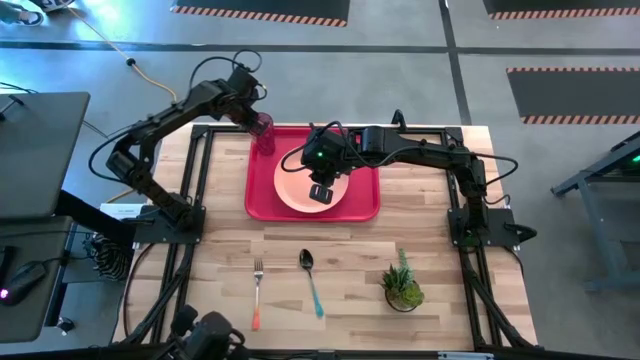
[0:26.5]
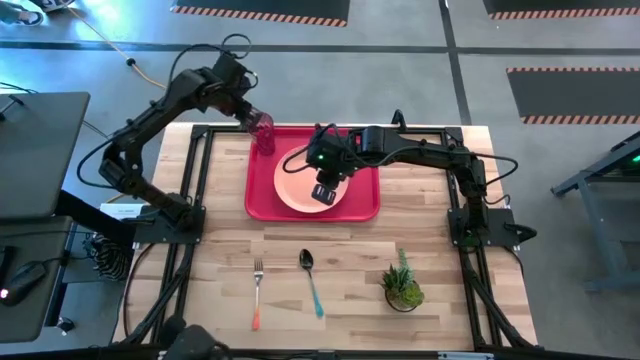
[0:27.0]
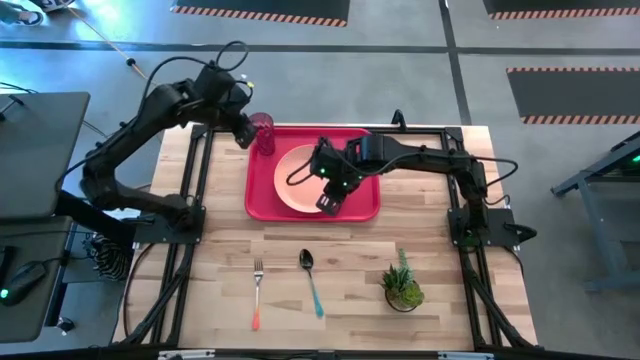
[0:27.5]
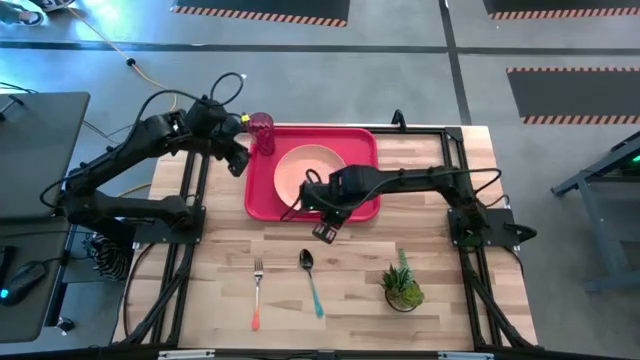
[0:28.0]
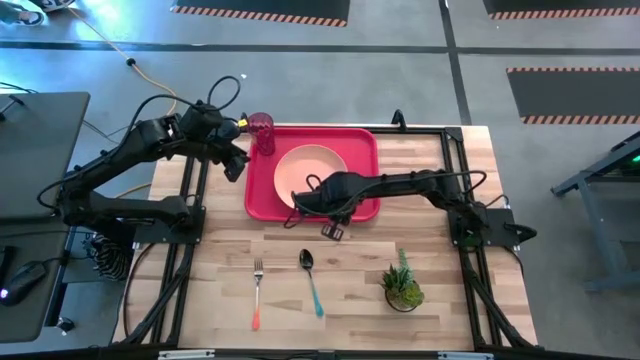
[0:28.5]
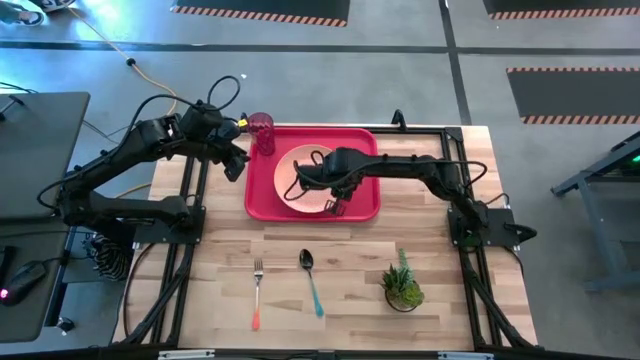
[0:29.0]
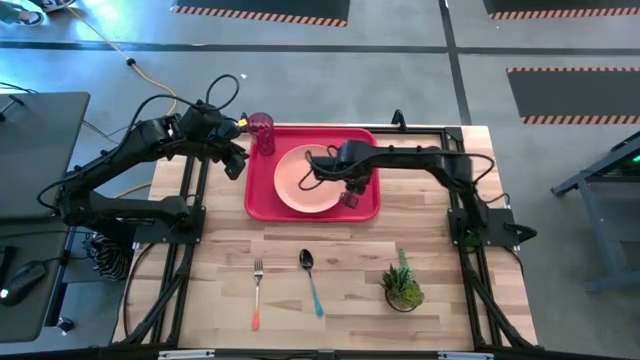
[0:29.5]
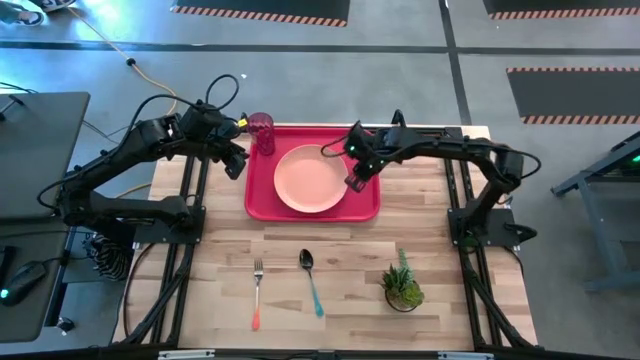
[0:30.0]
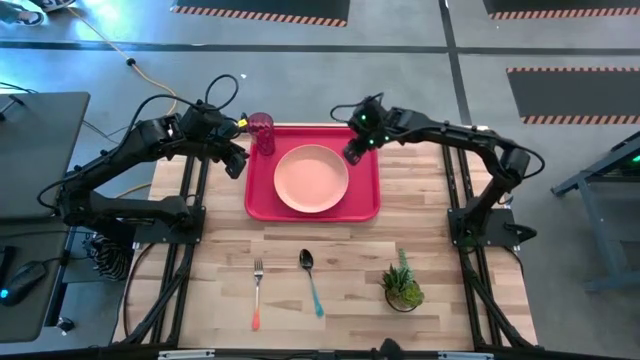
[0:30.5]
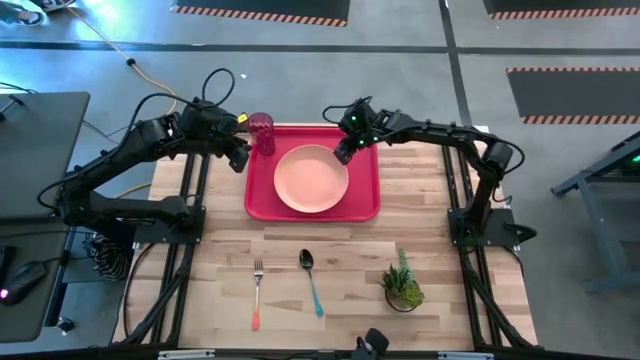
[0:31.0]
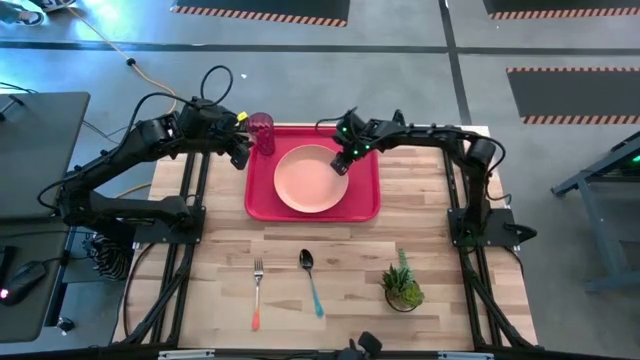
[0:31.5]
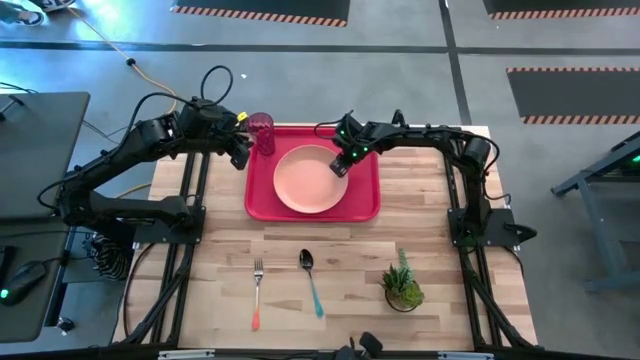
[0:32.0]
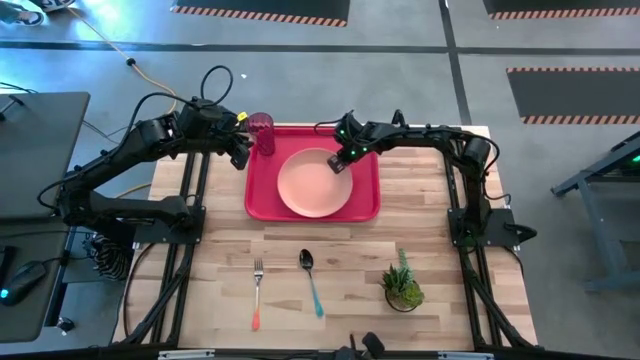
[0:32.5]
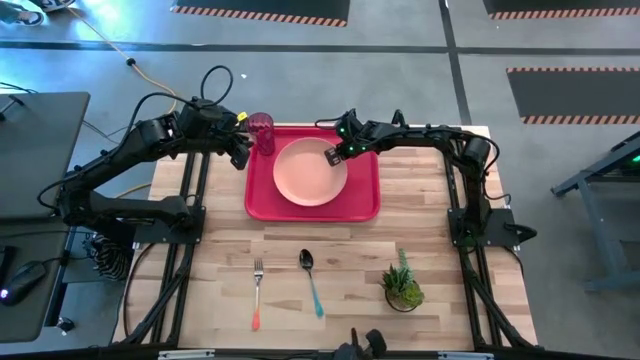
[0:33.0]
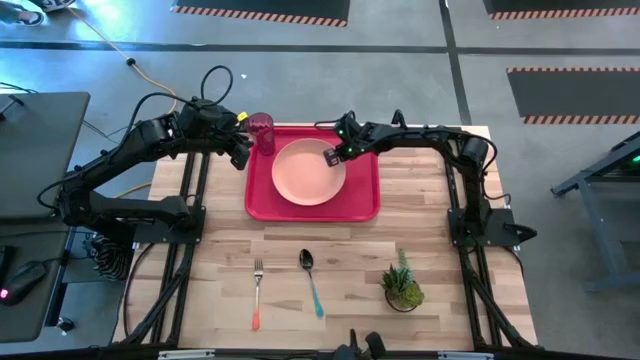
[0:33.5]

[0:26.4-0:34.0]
Task: Pick and place plate/cup/fork/spoon on tray
Adjust the pink plate on the red tray

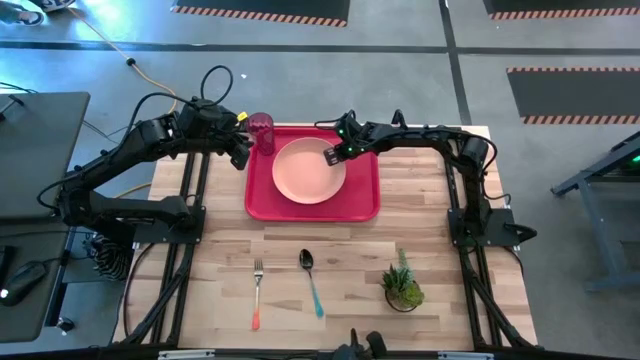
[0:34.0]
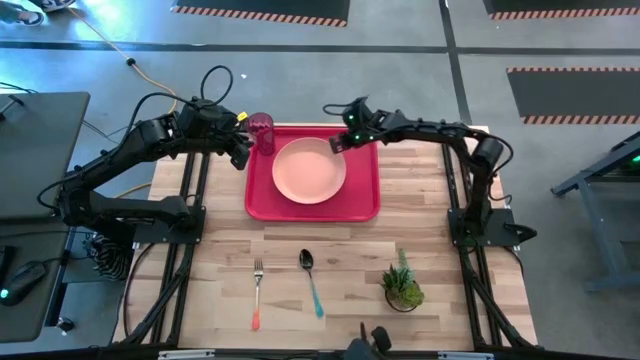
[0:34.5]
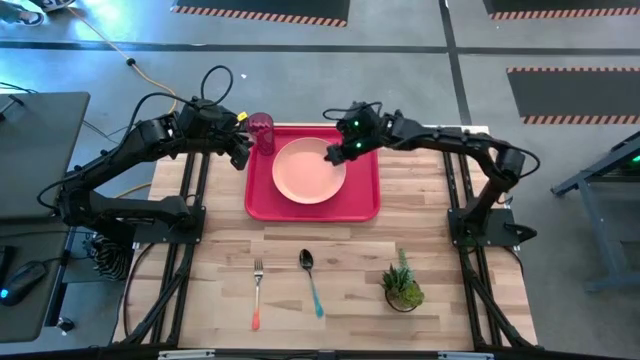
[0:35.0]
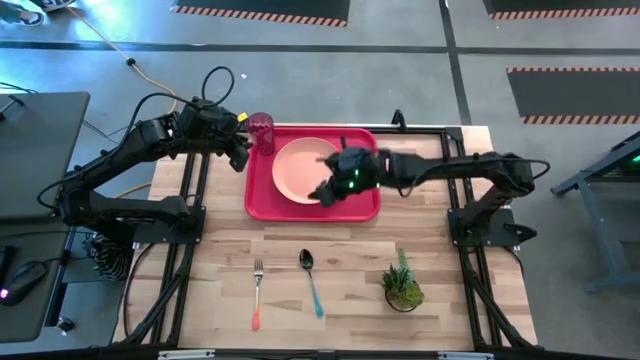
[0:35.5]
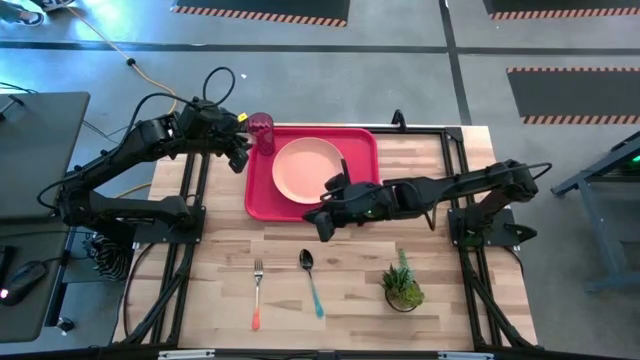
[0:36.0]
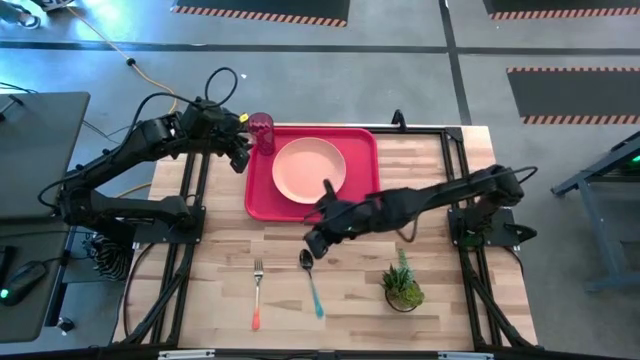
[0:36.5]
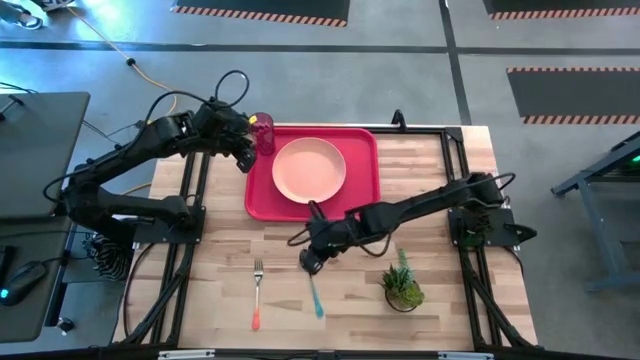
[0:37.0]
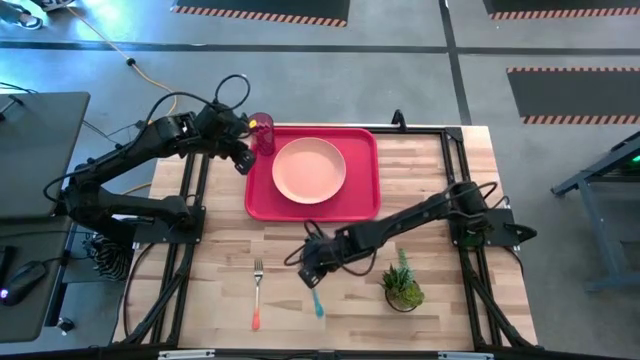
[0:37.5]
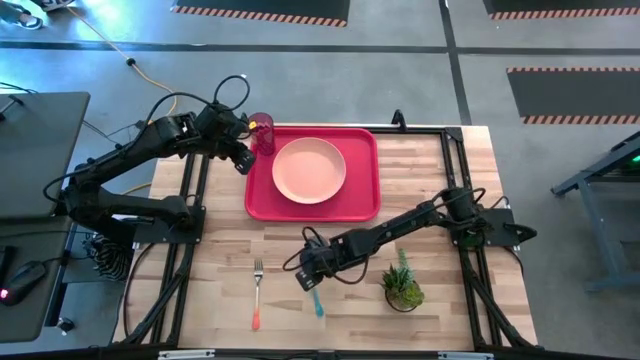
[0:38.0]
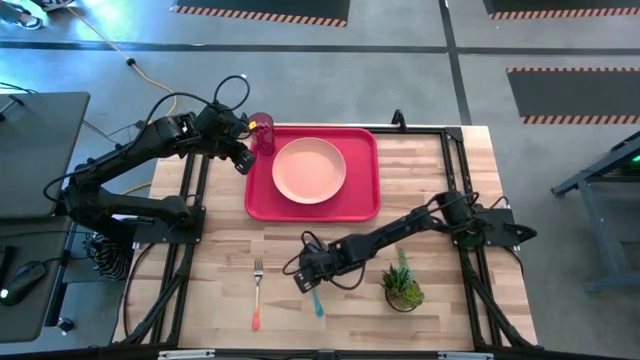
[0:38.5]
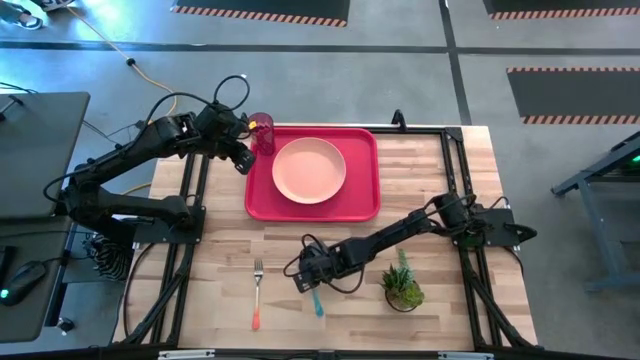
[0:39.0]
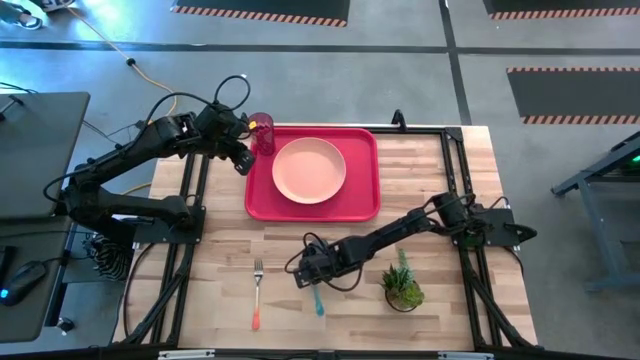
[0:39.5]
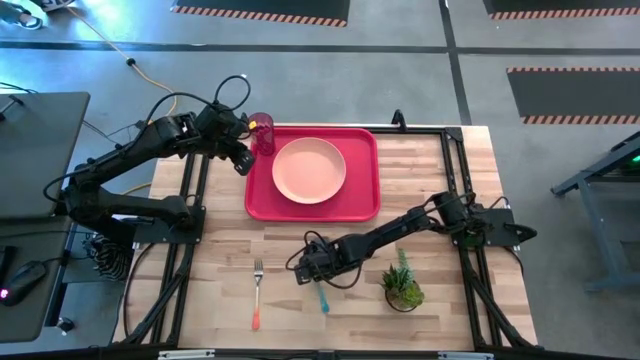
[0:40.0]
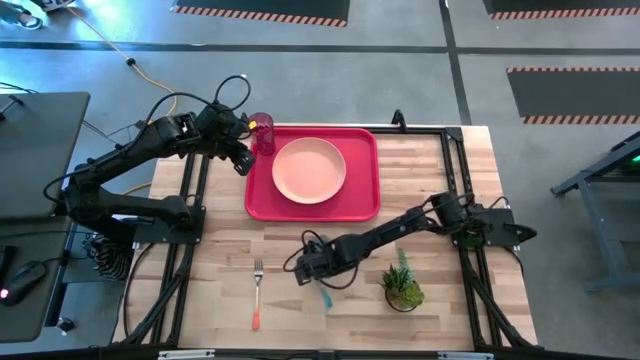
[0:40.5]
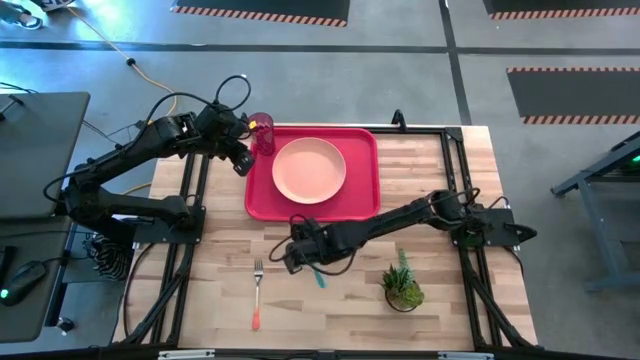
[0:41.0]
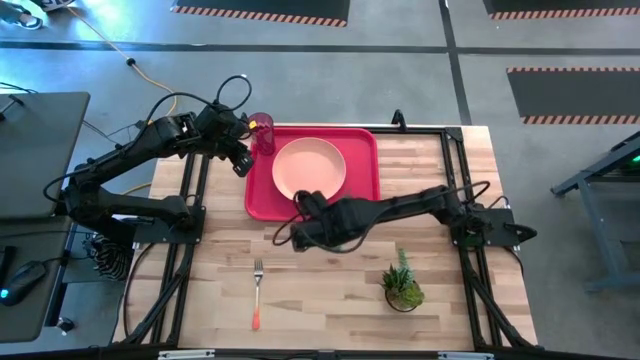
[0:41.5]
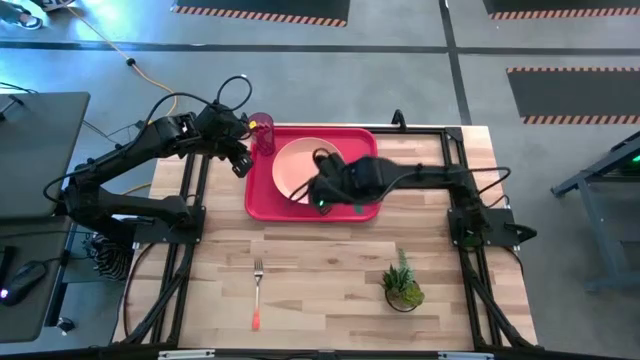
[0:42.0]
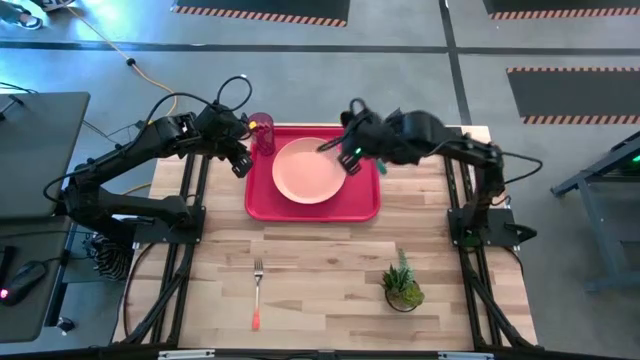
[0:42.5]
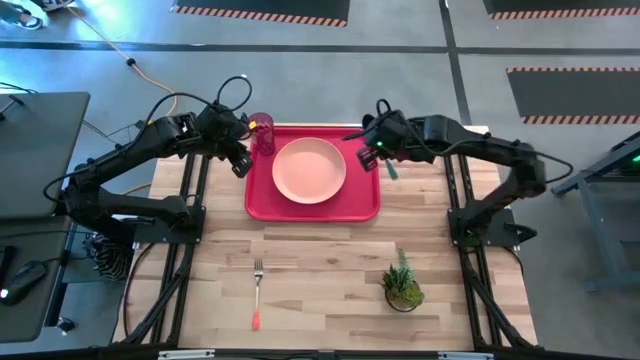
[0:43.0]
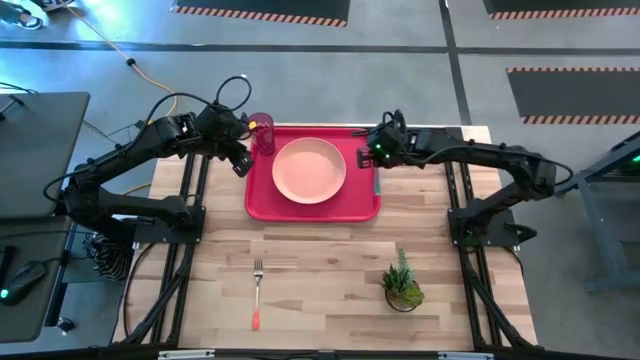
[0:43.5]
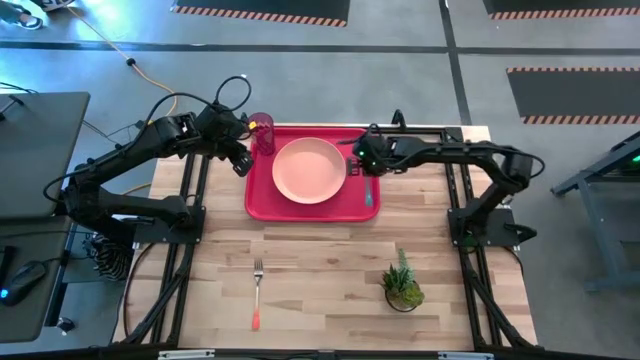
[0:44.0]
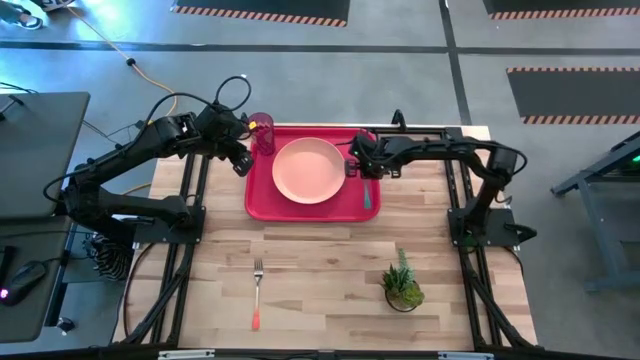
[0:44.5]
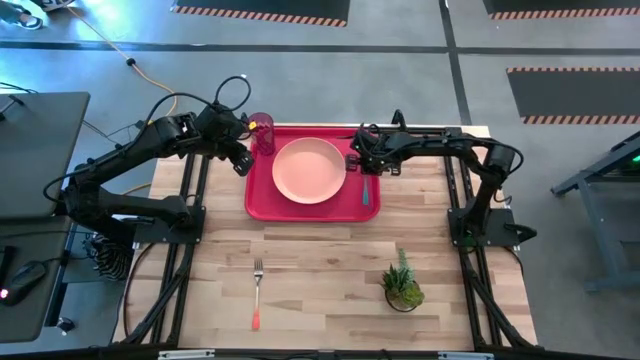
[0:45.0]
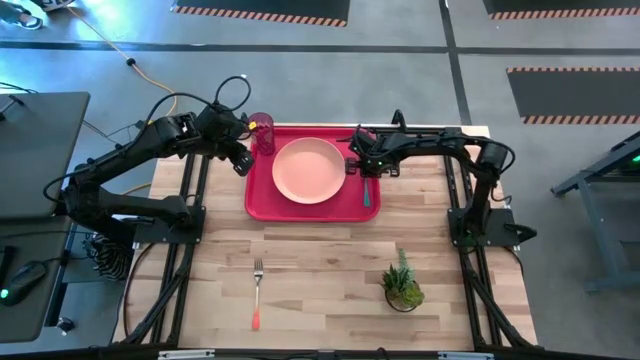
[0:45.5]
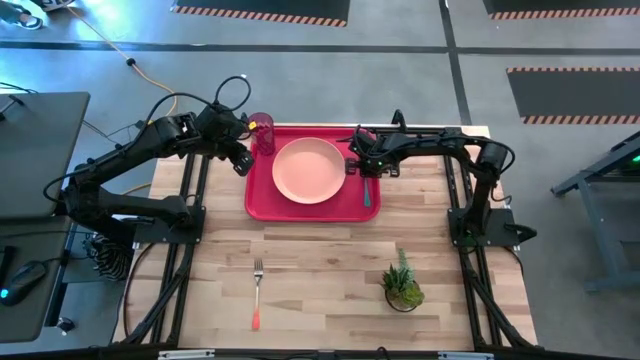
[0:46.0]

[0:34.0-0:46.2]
Put the blue spoon on the red tray to the right of the pink plate

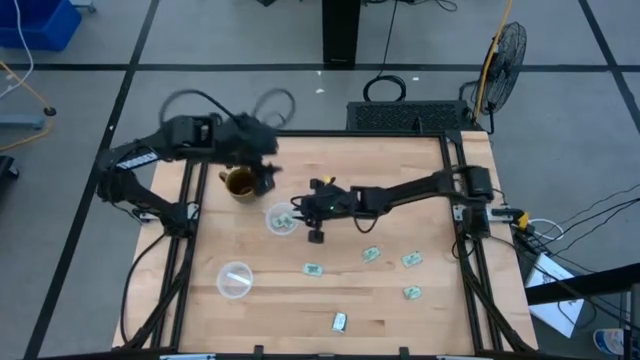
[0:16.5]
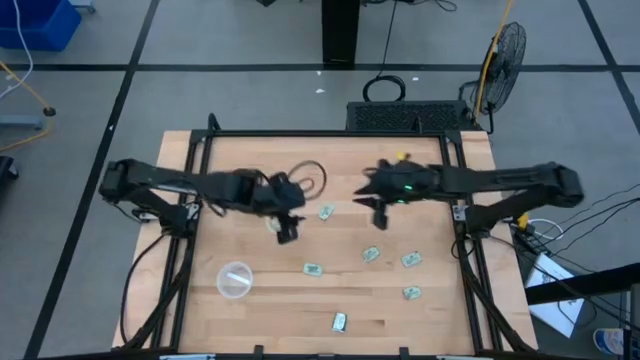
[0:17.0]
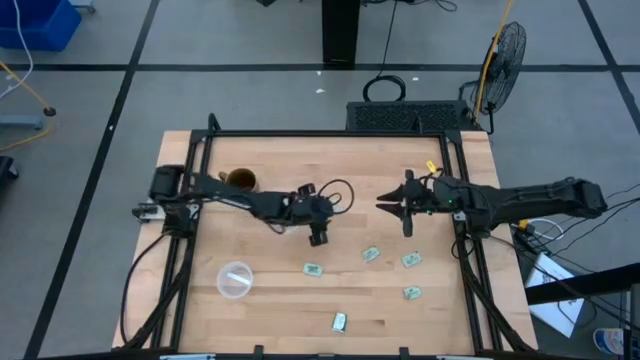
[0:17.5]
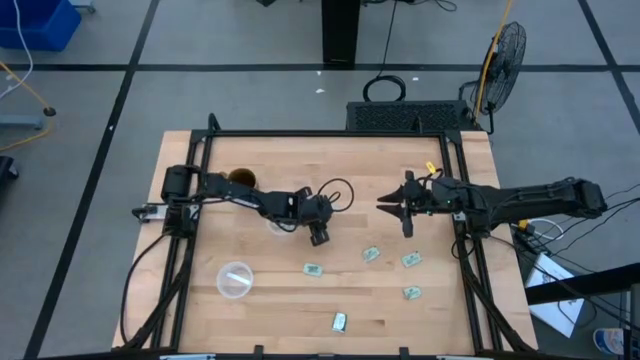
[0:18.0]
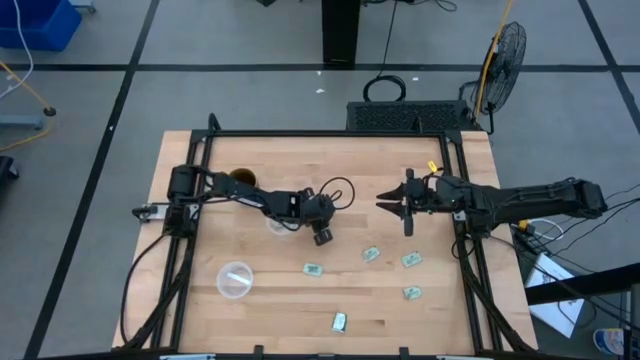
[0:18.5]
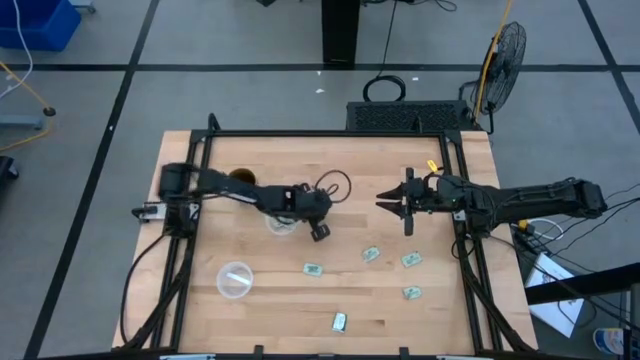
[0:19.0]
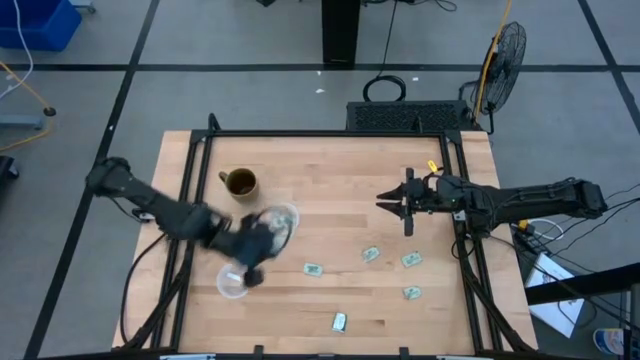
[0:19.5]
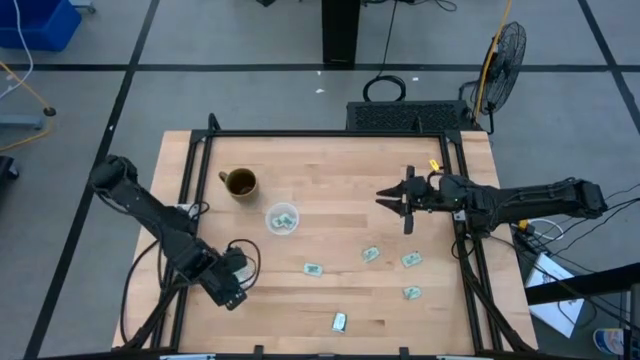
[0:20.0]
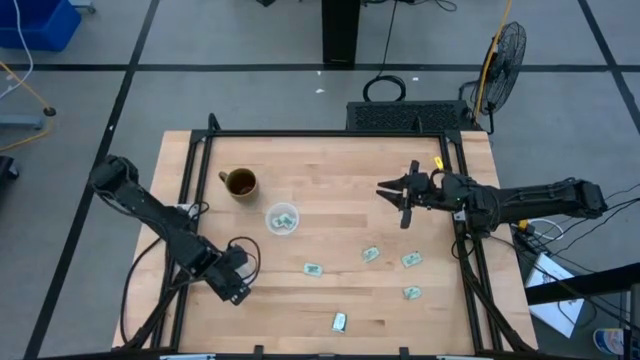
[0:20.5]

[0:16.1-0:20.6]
Task: Pick and place Stevia / Truvia into bins
Put the stevia packet into the bottom transparent container
